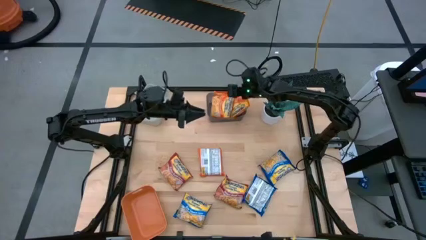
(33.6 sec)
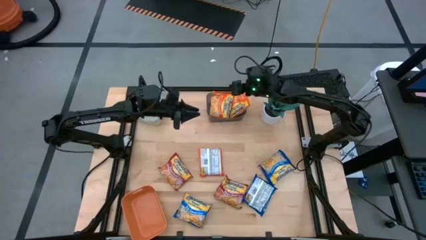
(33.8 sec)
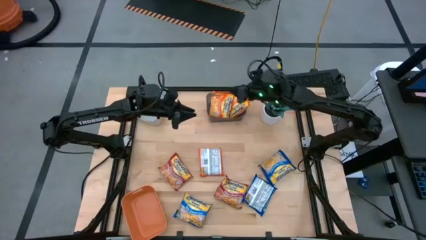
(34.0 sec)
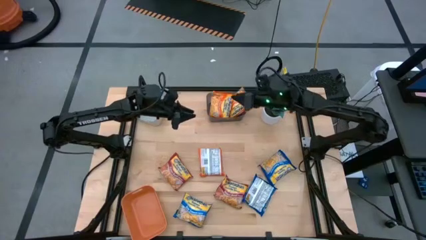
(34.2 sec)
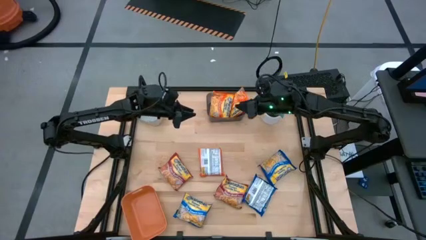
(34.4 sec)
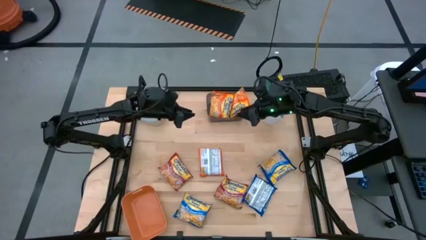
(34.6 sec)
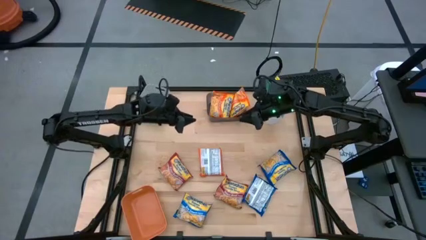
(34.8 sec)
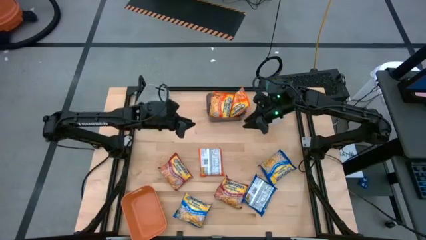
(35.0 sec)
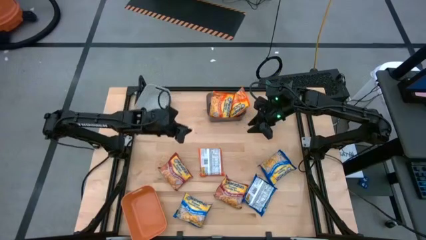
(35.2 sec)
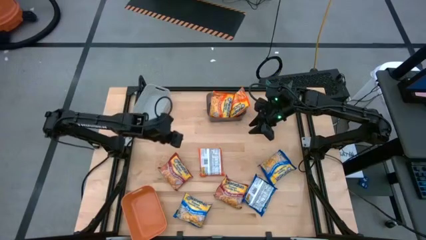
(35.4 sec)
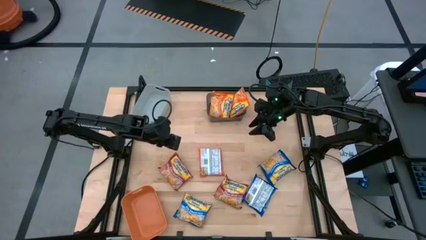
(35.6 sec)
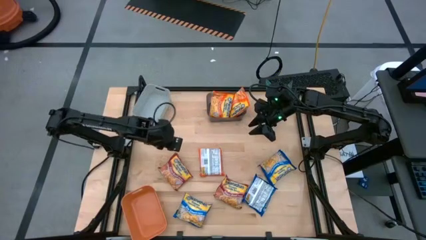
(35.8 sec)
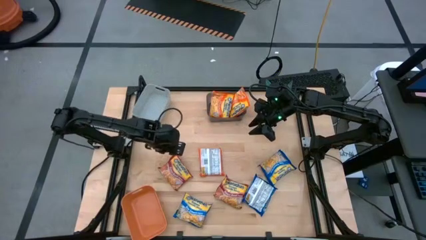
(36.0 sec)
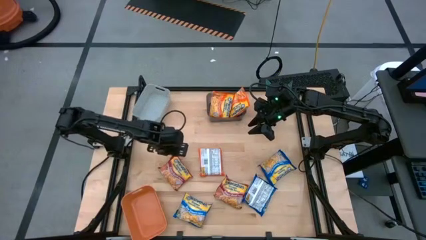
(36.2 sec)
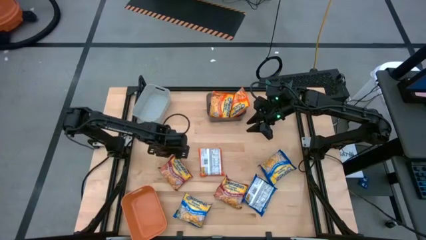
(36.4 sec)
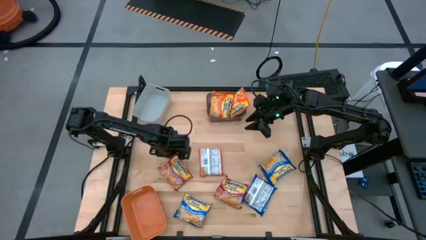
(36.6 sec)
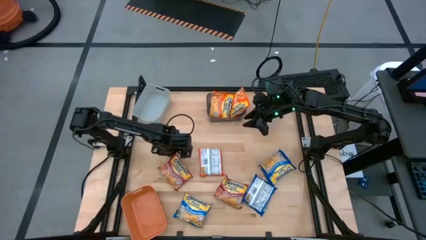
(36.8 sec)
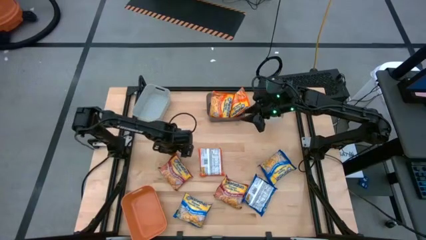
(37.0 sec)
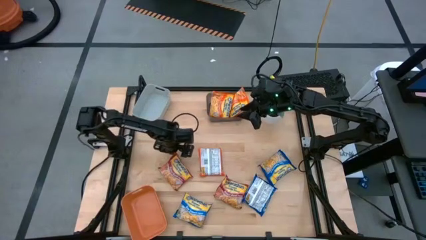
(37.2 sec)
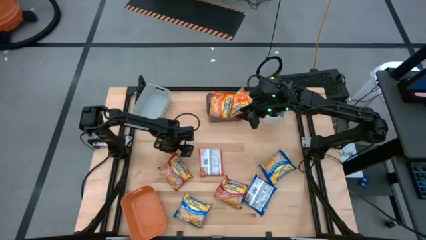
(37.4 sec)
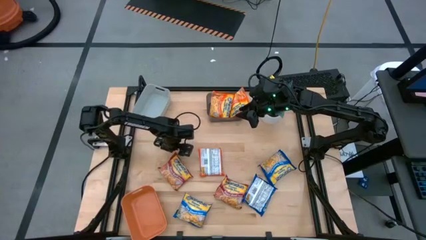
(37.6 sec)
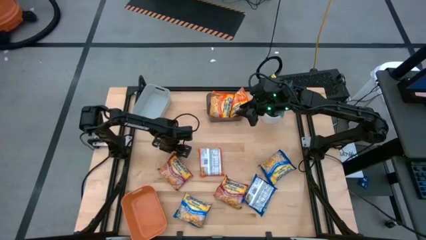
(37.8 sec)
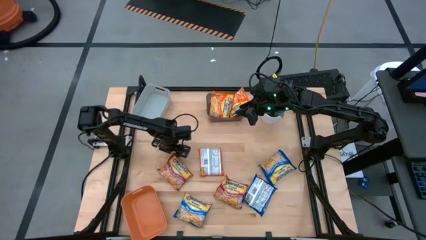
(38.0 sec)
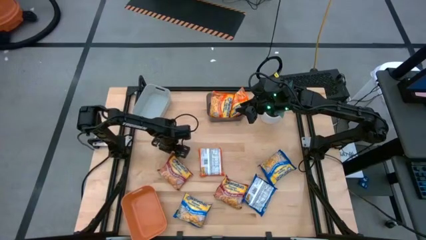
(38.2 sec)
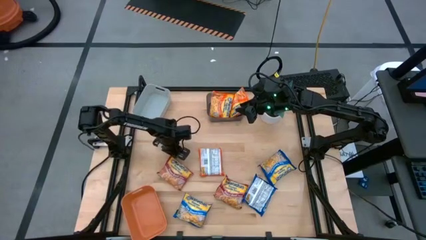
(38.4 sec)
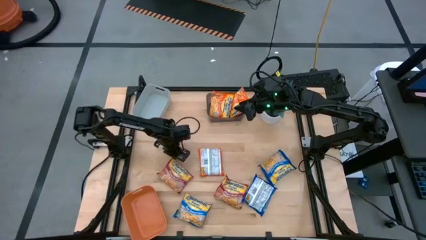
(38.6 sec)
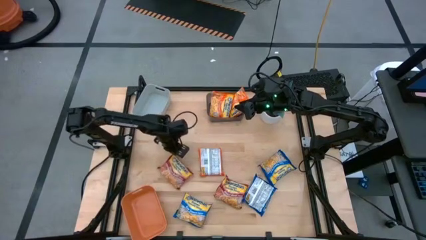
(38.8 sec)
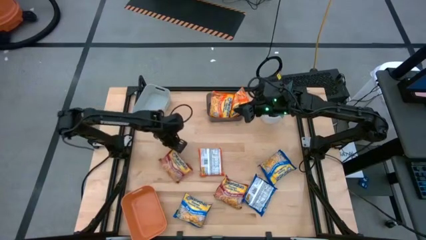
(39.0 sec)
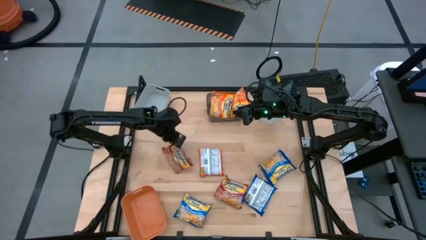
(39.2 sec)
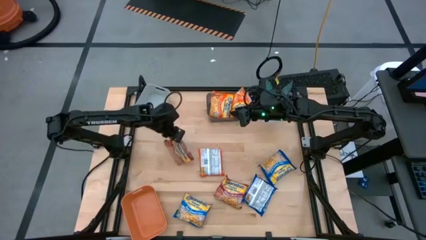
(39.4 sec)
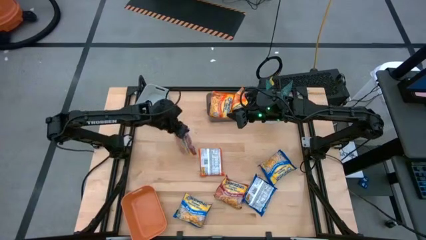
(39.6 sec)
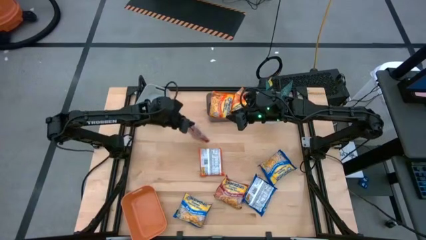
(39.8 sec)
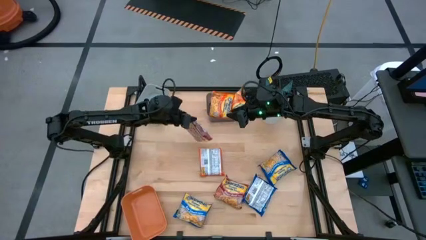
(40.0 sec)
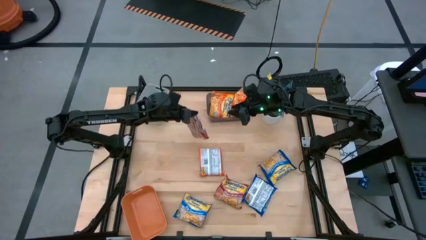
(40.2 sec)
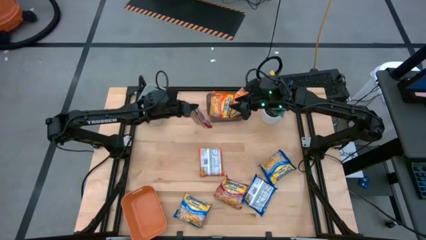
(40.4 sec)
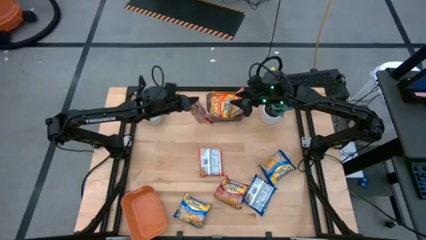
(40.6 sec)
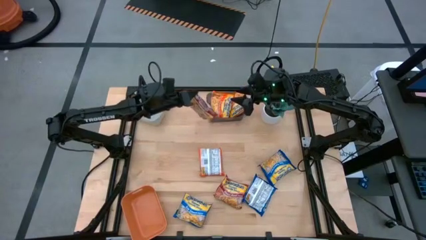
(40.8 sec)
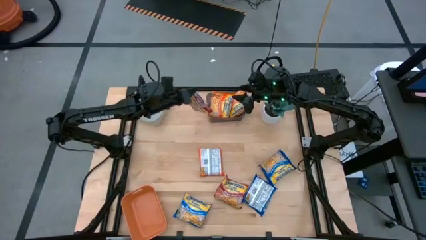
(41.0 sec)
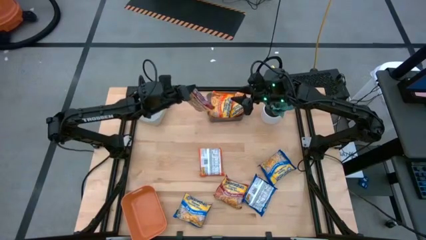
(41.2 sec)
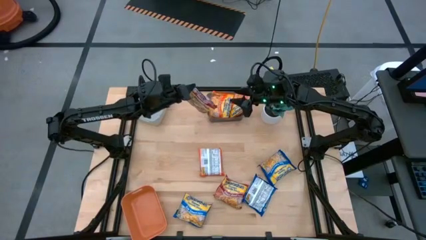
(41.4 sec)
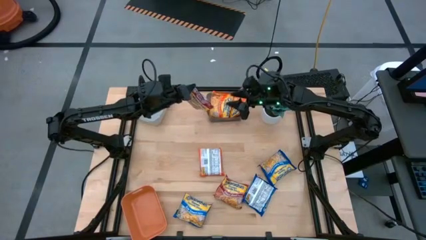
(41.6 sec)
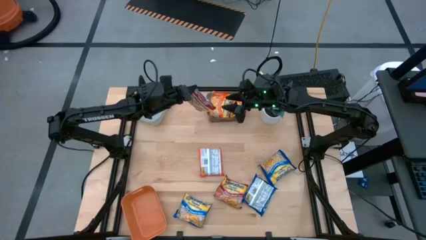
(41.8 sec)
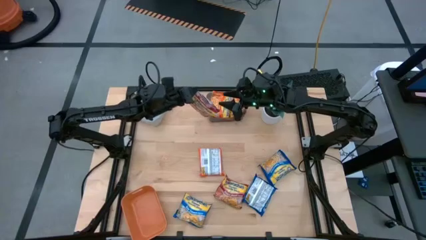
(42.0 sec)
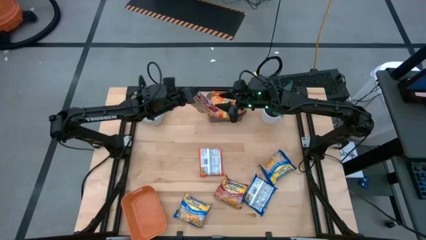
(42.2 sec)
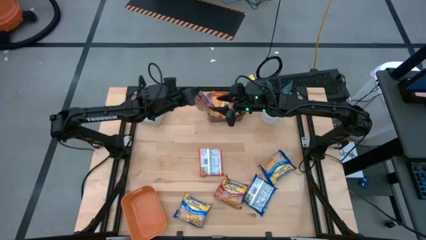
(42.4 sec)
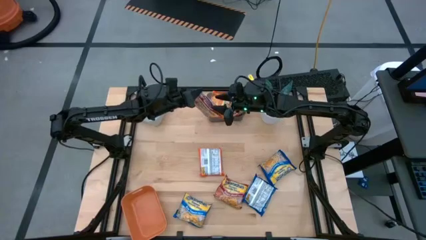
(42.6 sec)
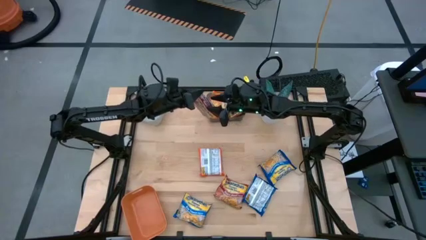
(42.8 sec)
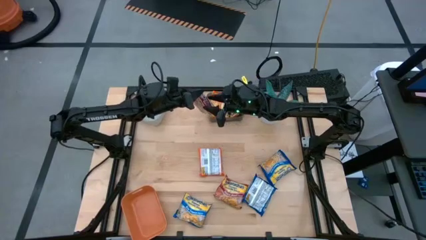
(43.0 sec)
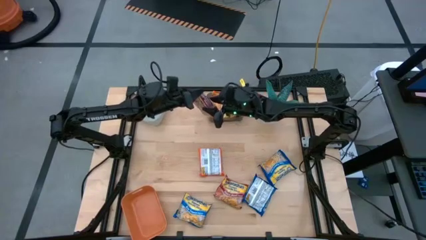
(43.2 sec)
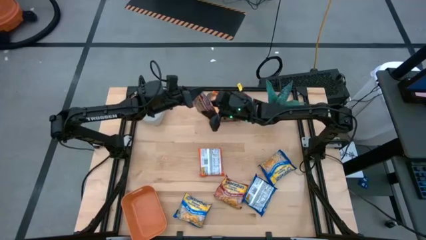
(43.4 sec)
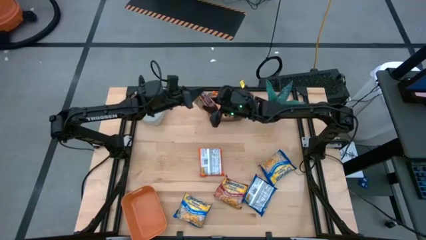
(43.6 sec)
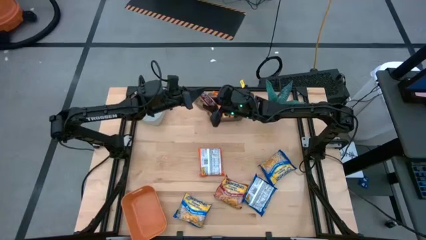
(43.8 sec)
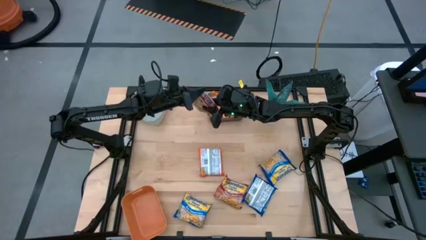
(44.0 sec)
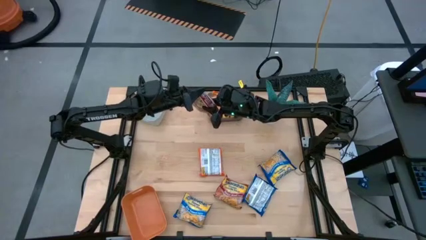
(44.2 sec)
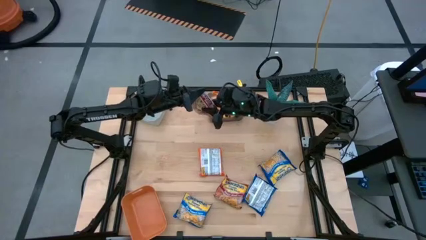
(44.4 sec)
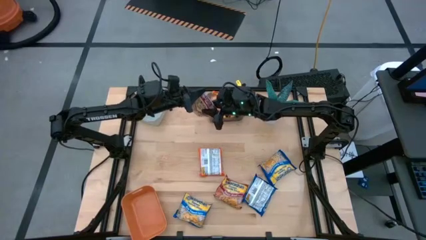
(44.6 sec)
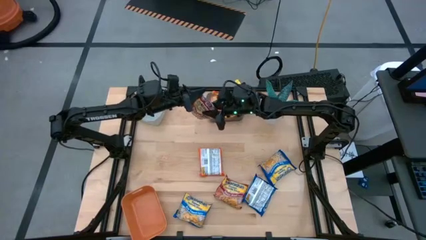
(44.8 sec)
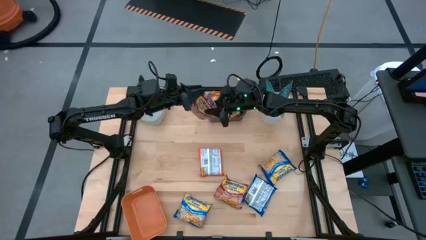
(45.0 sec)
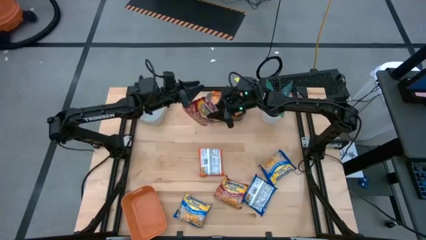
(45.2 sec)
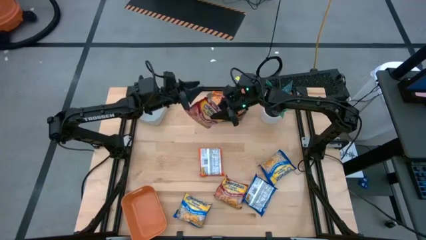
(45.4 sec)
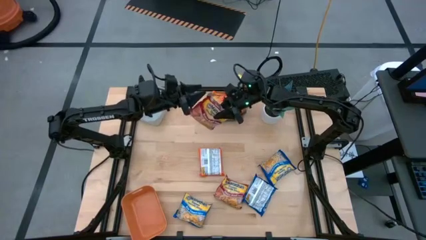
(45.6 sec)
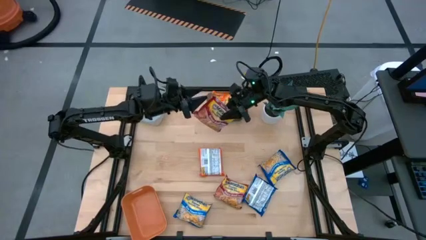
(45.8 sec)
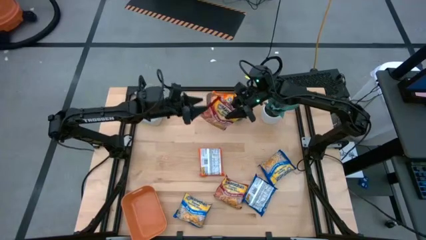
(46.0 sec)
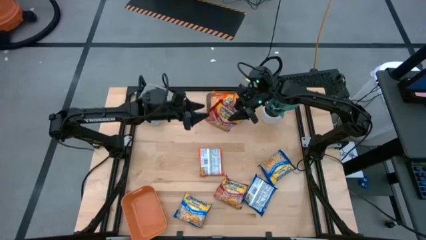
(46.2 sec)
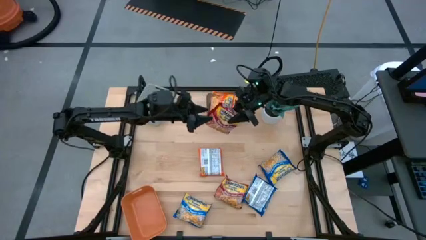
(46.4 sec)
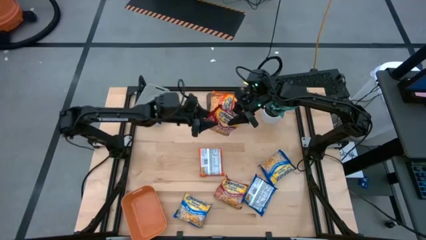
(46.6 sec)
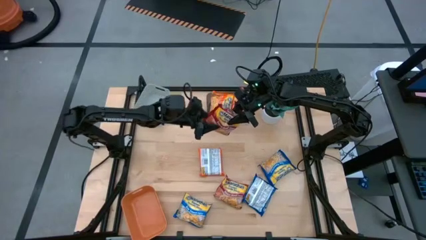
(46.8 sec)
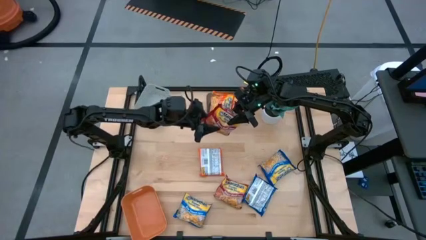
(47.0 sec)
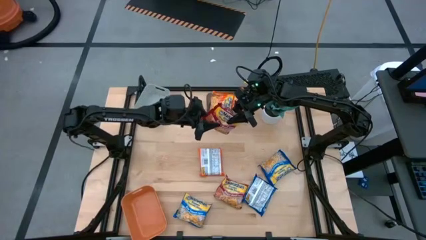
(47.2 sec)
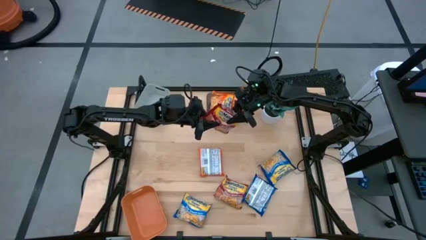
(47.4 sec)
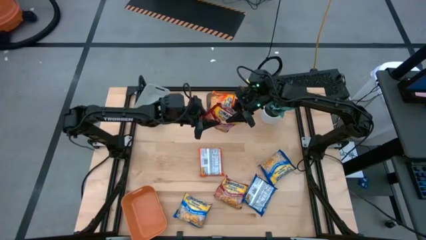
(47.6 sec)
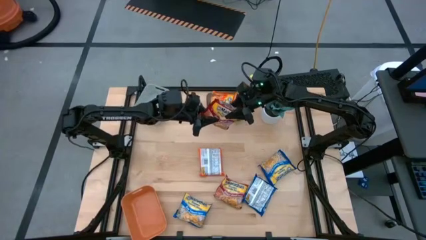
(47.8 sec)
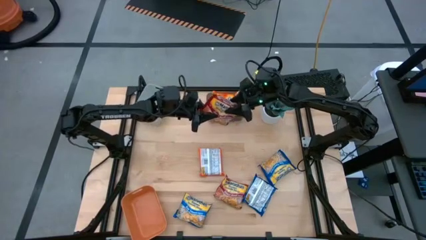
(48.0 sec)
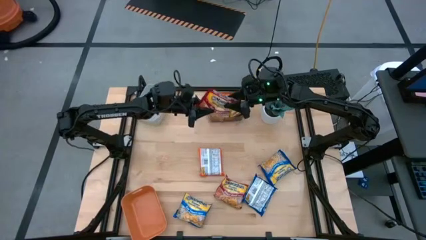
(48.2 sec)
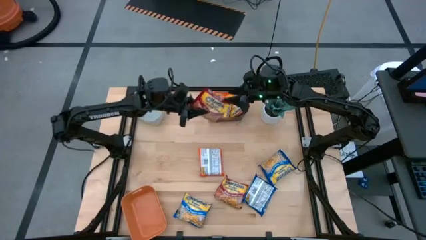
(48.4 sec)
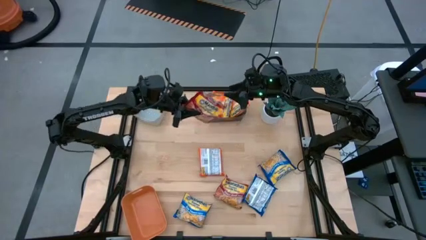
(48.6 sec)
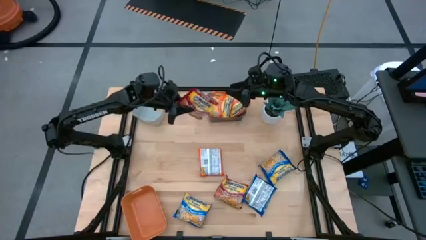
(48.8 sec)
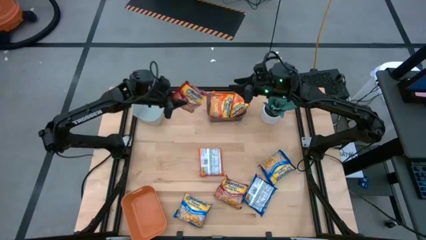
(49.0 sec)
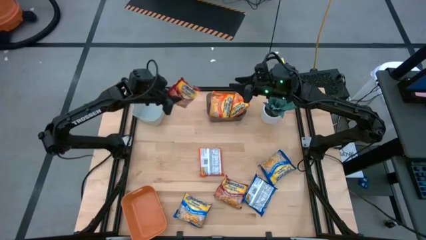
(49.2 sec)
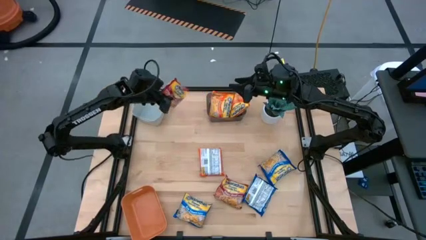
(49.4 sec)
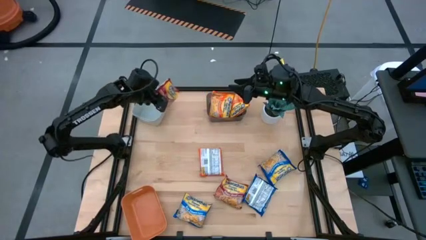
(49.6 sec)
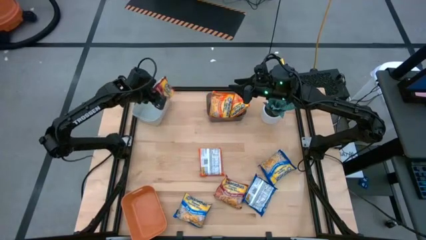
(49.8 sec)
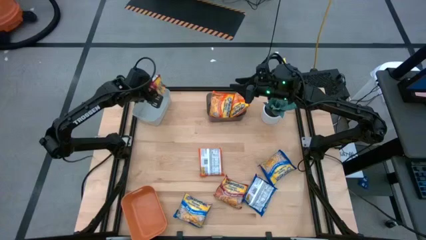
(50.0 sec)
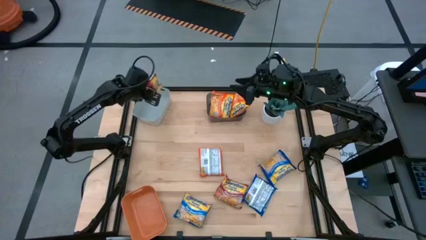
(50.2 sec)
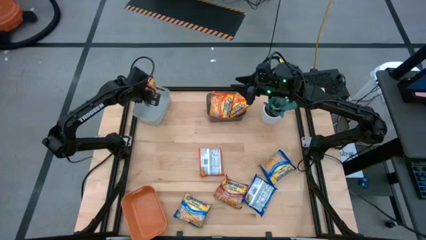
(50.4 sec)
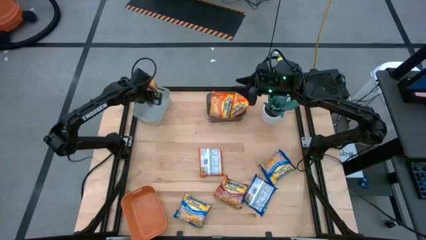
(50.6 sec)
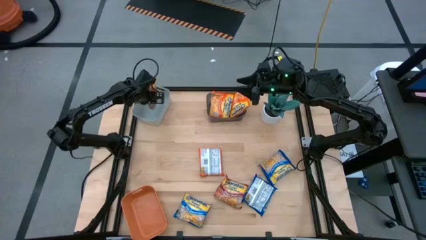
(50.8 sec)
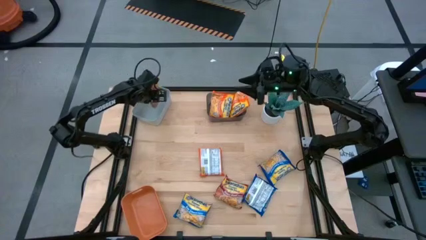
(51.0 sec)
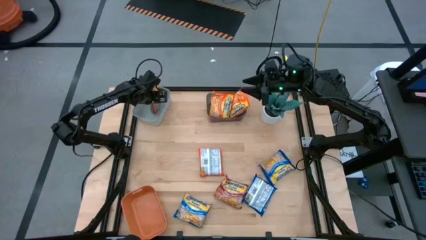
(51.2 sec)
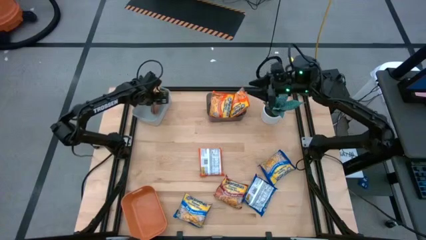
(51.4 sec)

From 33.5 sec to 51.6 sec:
Task: Sort Maruchan noodles
Put the left red noodle pack into the grey bin
